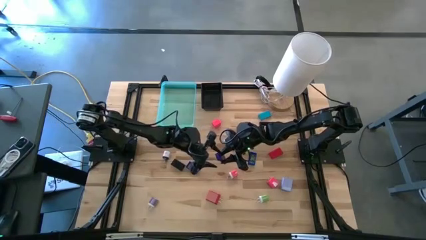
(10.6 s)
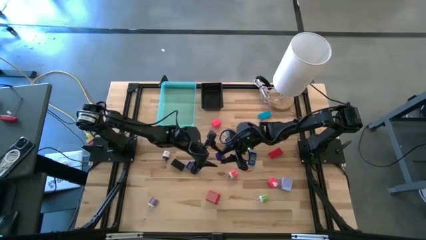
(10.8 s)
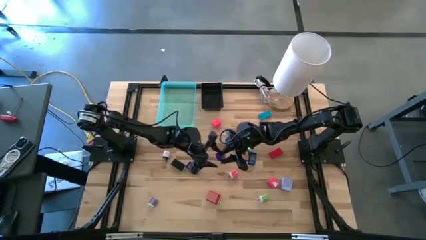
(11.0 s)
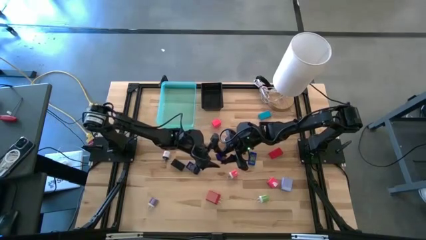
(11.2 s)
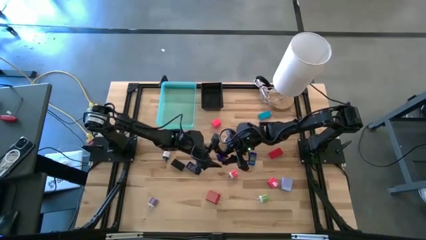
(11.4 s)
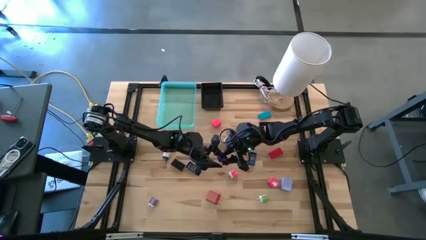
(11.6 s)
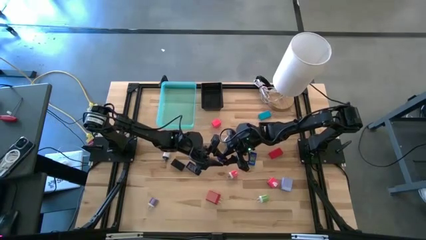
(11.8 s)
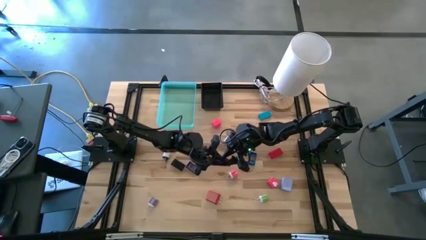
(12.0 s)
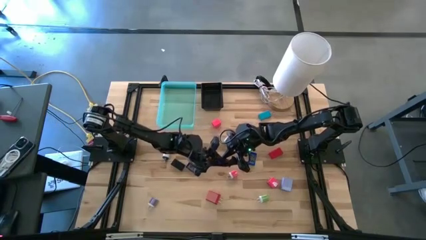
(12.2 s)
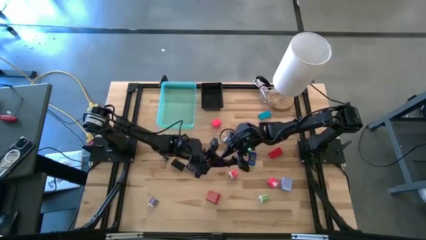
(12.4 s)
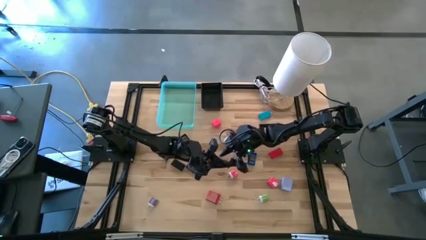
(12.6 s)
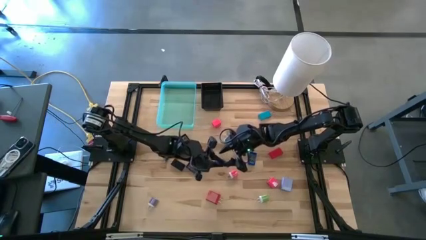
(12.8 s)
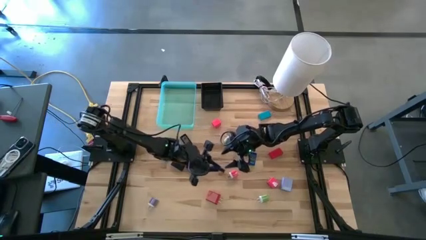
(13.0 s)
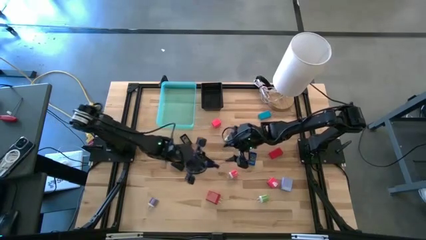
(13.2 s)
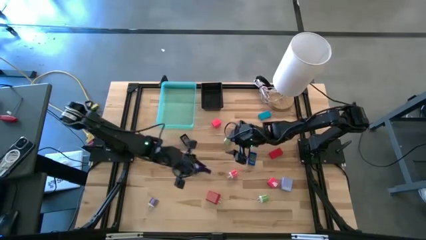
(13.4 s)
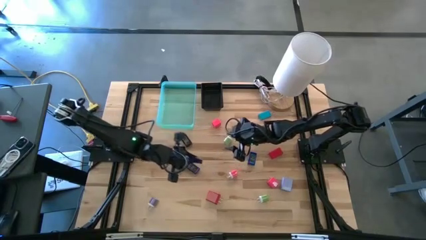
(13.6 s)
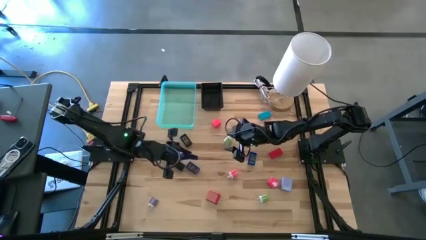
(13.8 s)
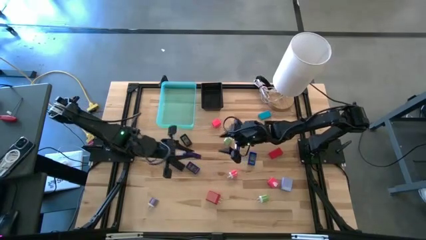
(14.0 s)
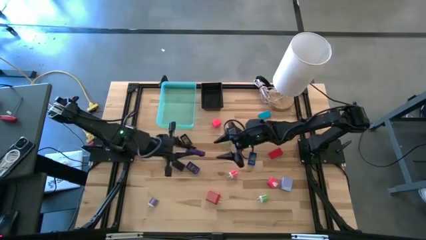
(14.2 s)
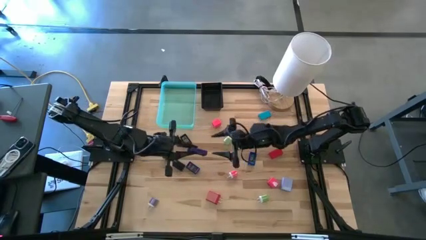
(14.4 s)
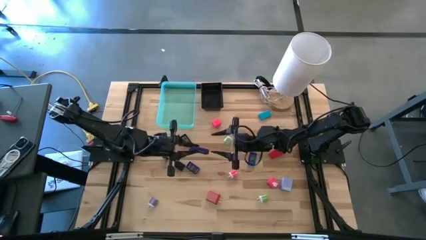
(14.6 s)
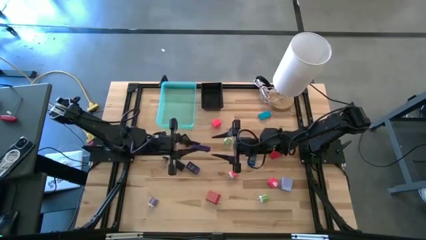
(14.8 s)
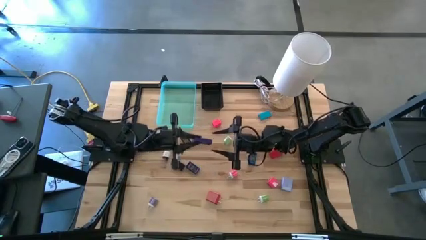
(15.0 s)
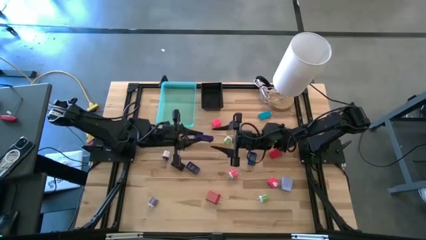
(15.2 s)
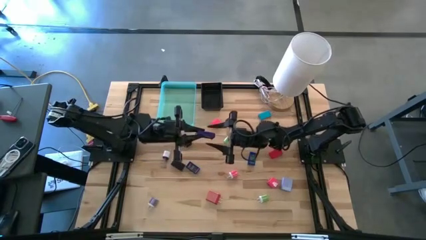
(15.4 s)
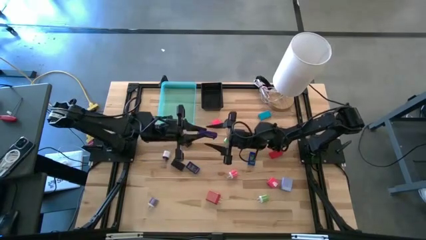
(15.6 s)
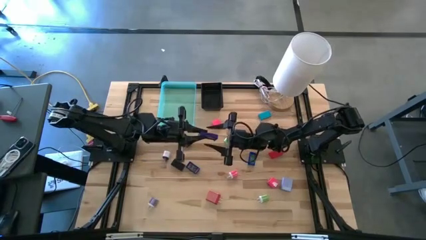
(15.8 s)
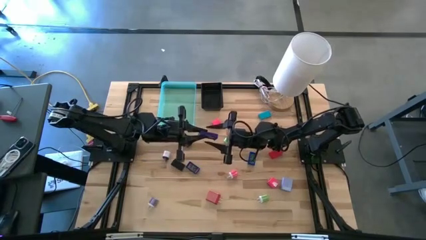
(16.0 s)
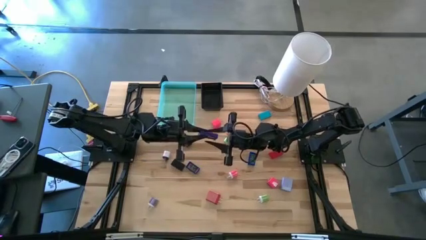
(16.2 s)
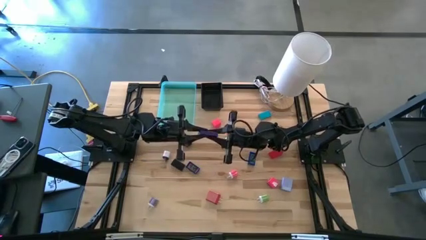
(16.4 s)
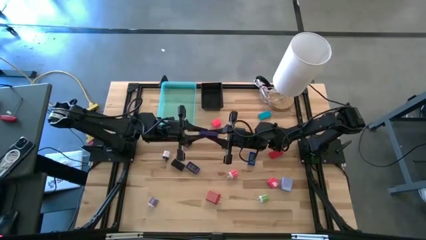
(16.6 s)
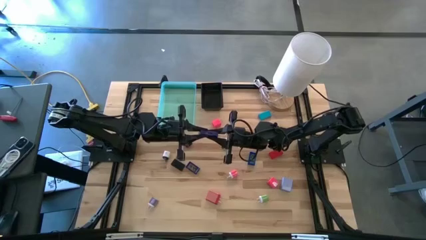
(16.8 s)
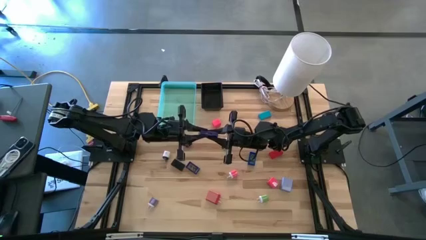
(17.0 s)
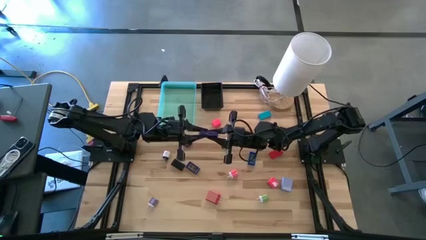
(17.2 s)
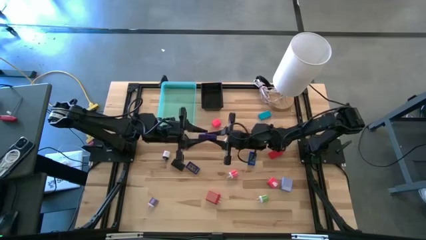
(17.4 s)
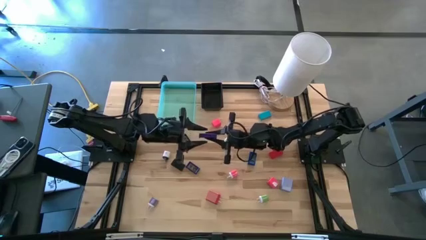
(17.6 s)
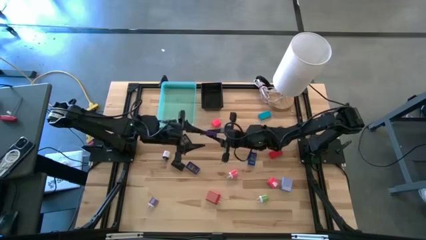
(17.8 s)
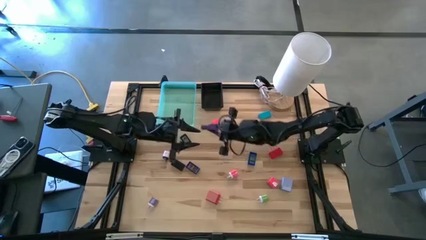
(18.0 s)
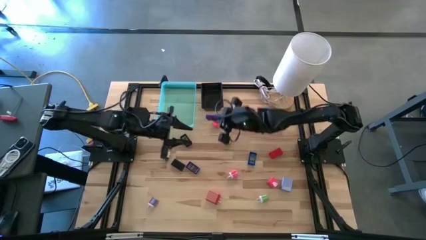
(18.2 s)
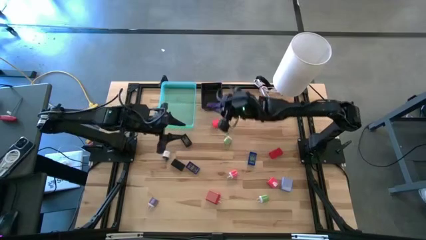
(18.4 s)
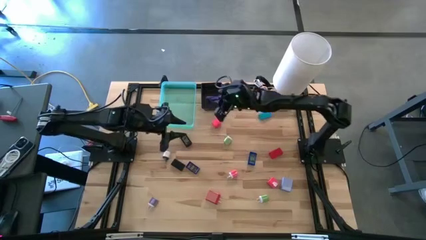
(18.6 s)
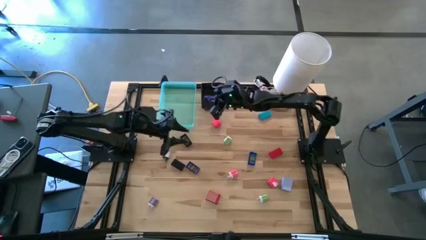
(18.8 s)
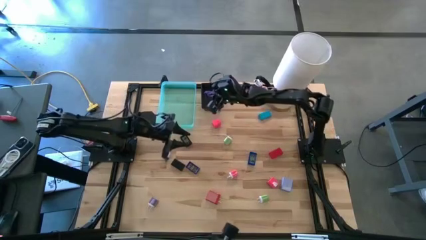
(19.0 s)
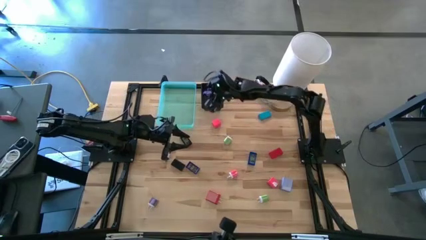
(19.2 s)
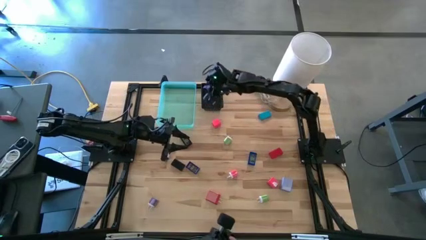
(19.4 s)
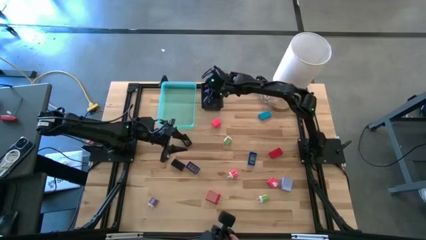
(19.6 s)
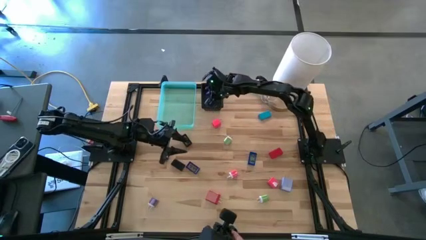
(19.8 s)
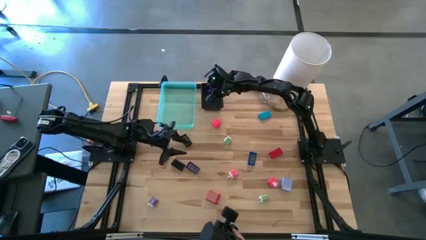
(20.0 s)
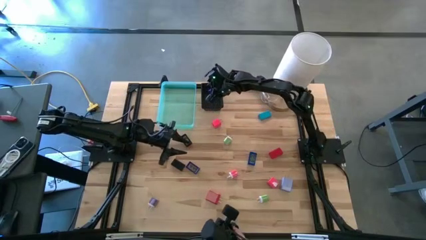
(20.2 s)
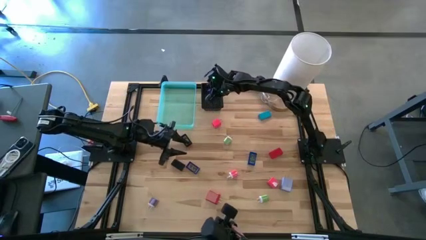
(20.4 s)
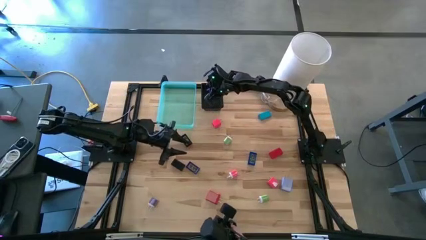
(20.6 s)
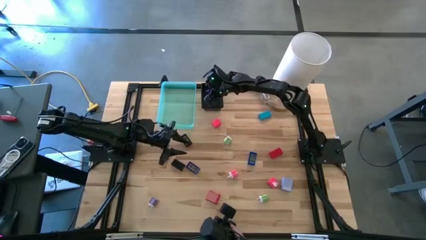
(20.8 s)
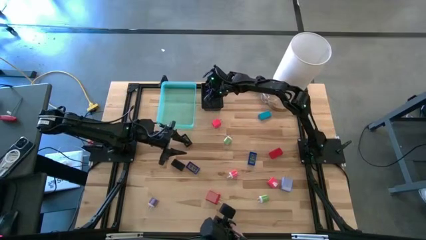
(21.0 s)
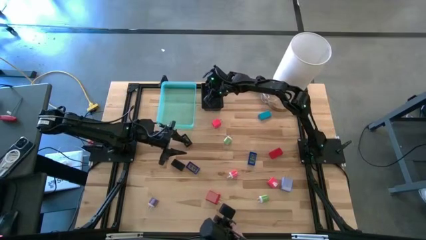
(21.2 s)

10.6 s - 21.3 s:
Task: Pick & Place Office items
Put the top right blue timer into the black bin
